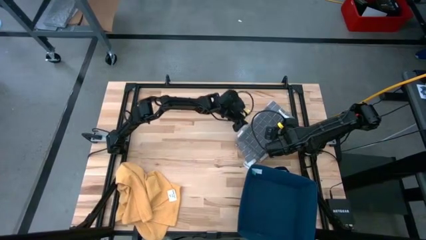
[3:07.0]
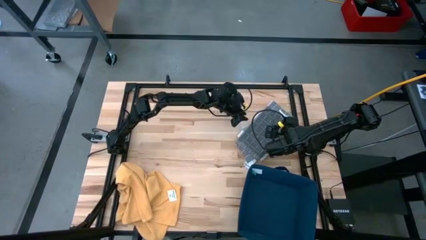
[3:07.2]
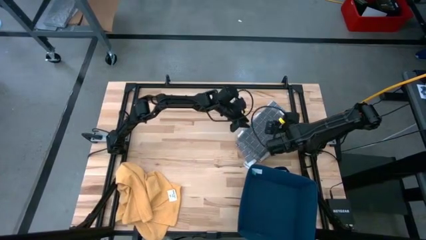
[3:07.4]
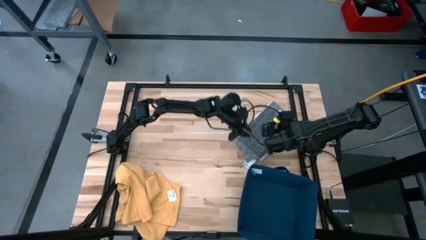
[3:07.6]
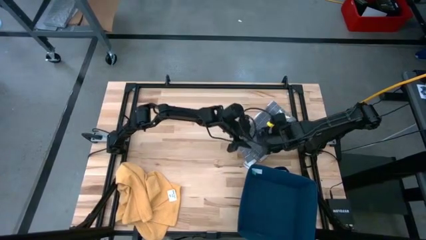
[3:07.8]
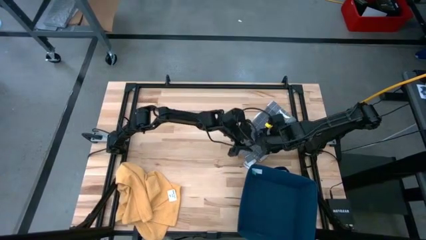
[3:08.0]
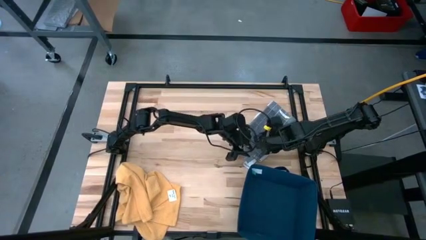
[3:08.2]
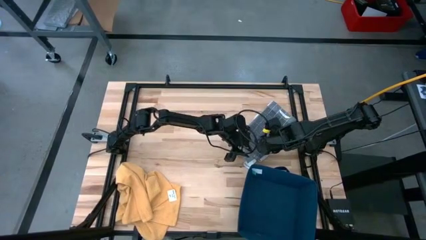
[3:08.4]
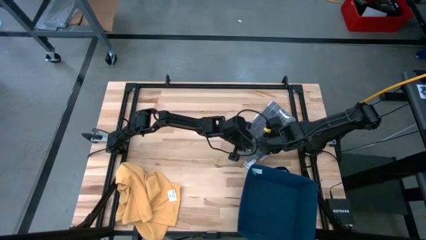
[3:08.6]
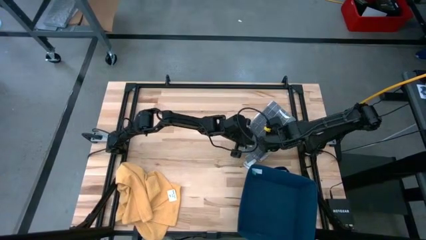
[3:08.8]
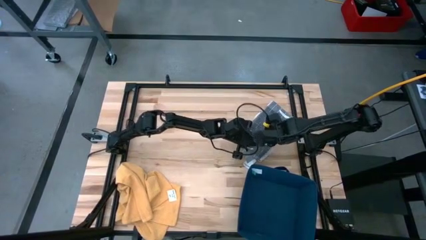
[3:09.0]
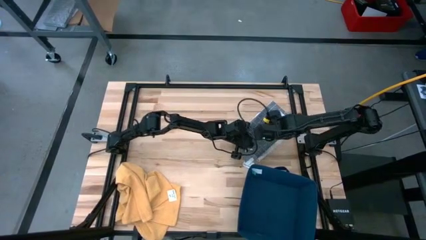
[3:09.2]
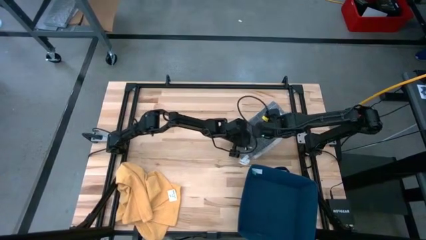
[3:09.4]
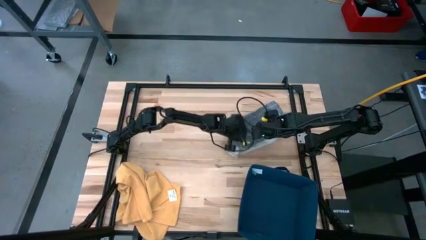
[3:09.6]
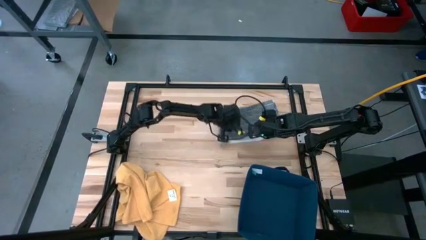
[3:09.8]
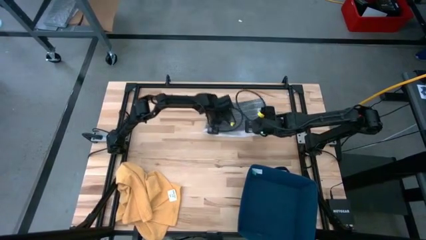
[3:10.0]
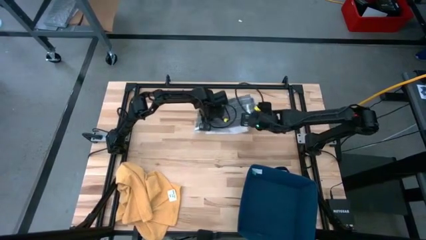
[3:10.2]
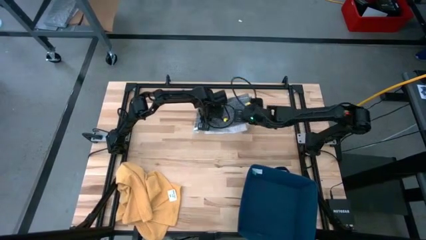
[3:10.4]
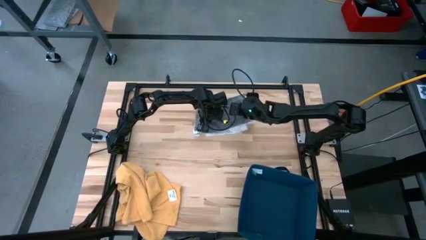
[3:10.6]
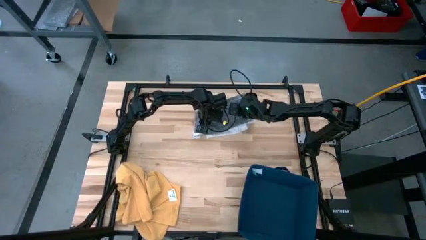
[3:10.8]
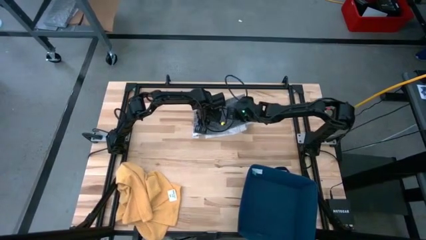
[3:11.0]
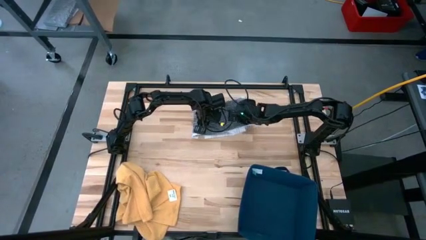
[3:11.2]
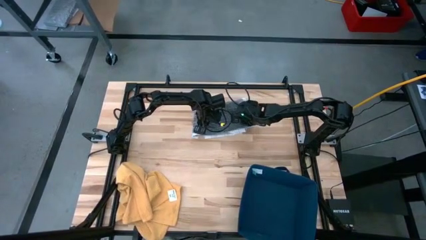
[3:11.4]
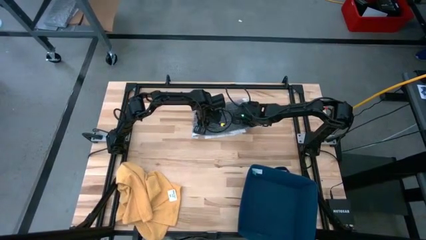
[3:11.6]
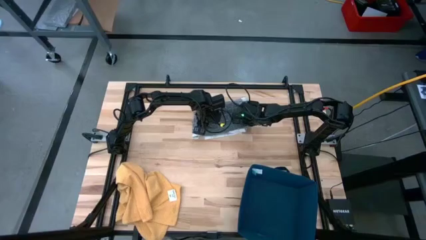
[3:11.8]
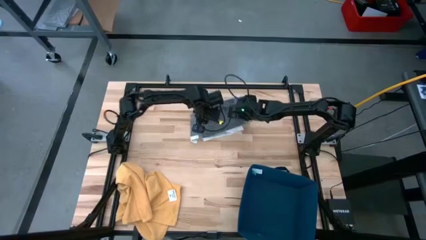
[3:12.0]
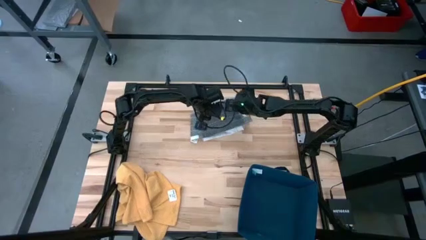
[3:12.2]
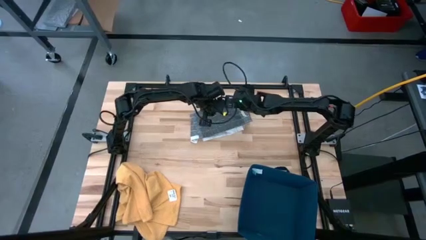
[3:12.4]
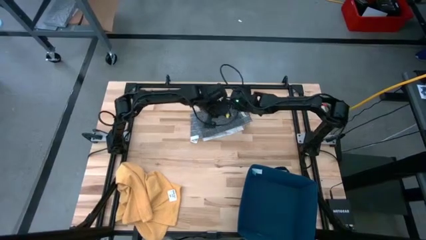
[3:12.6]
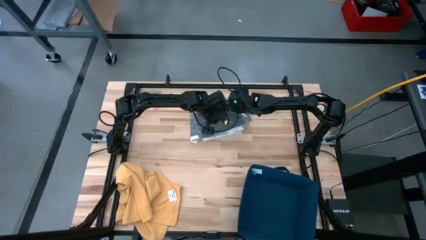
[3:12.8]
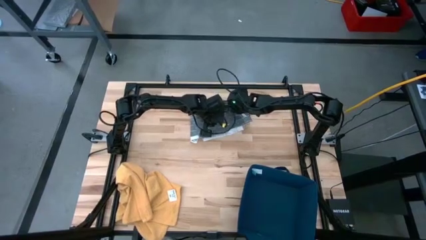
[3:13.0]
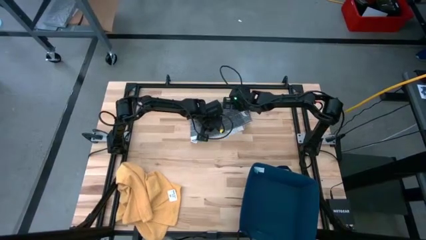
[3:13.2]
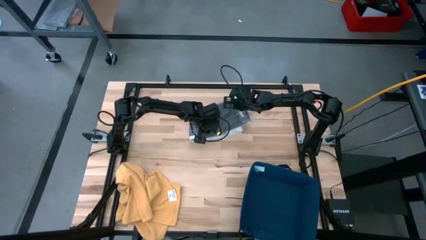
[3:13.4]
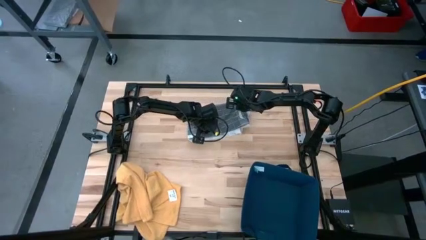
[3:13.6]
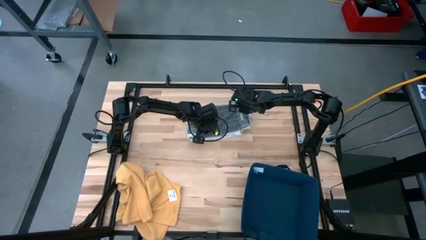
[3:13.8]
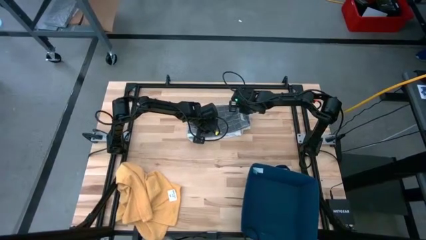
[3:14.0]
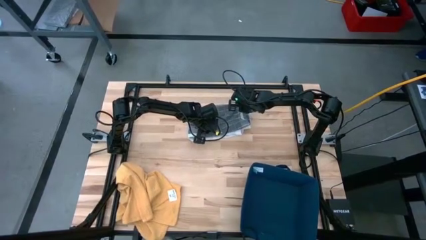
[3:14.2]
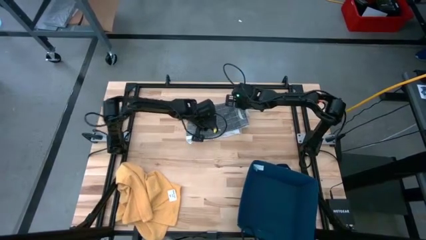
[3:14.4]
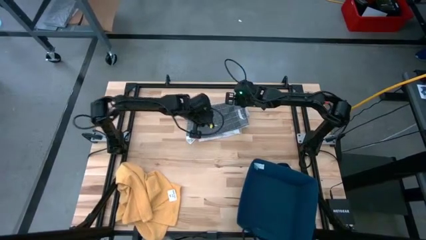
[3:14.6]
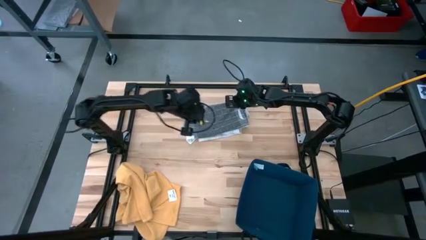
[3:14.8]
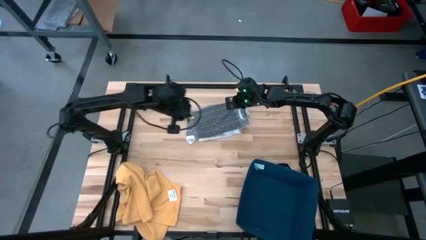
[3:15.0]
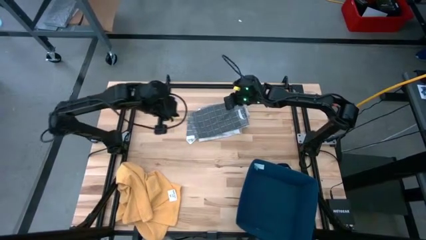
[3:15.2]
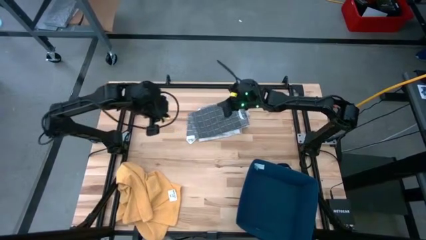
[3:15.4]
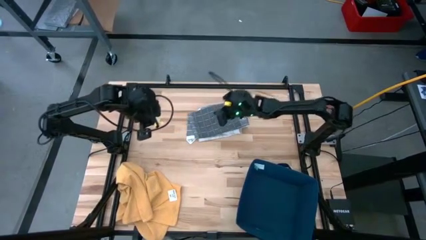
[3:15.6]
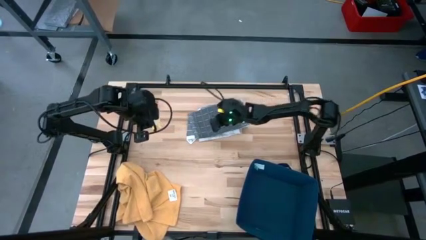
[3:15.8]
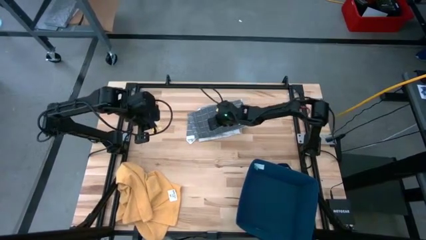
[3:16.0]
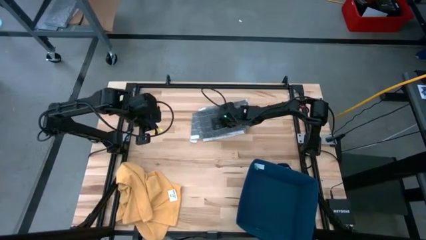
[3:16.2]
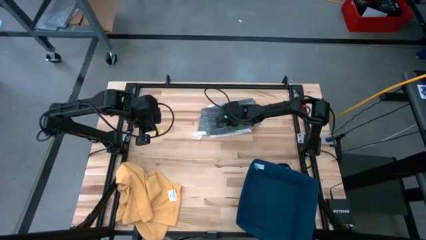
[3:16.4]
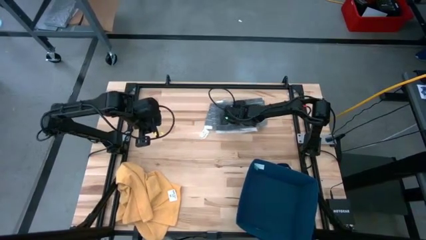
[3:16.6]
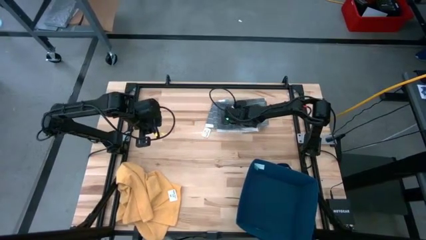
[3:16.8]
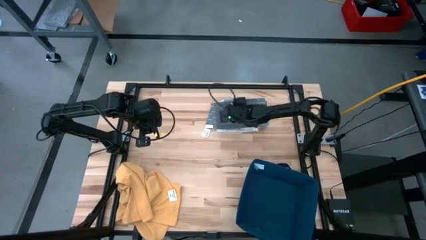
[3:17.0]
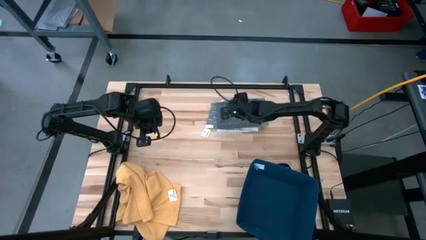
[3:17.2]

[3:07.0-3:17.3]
Task: Fold towel
Adjust the kitchen towels
